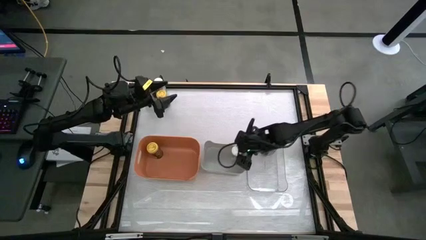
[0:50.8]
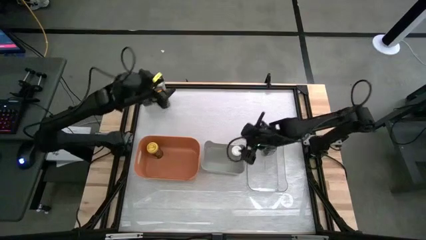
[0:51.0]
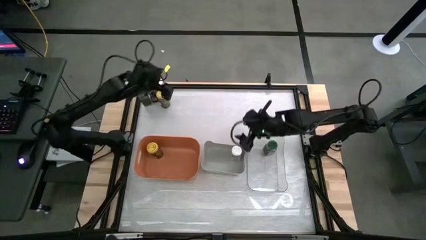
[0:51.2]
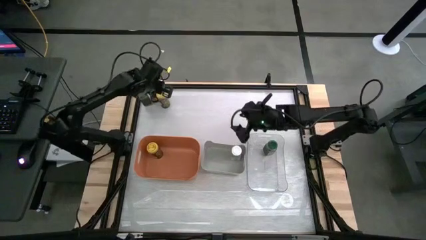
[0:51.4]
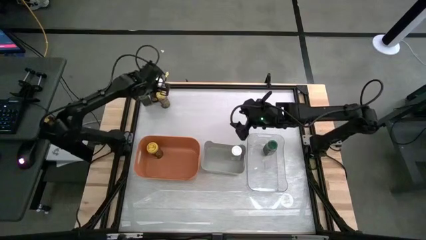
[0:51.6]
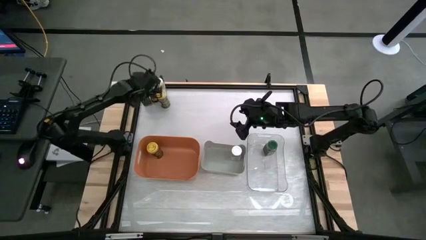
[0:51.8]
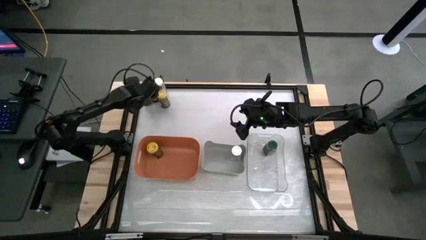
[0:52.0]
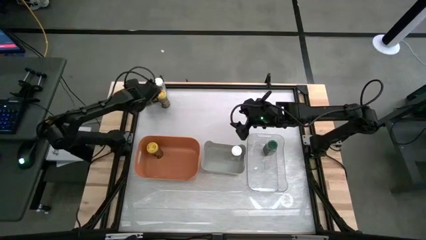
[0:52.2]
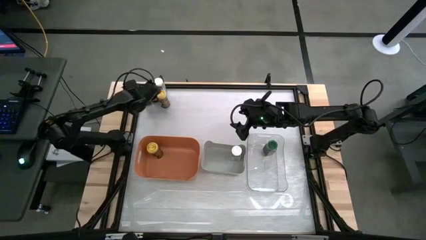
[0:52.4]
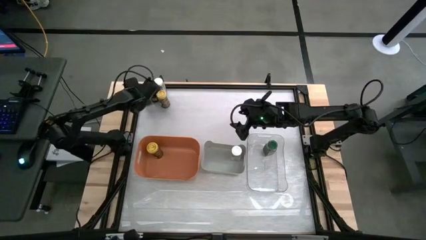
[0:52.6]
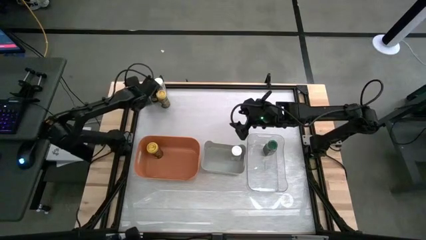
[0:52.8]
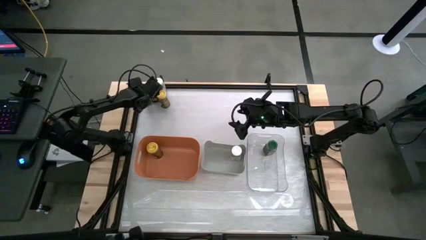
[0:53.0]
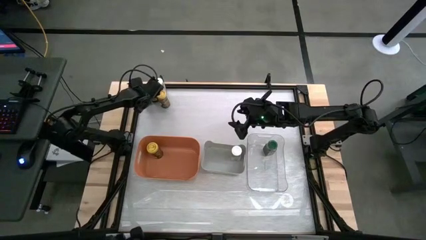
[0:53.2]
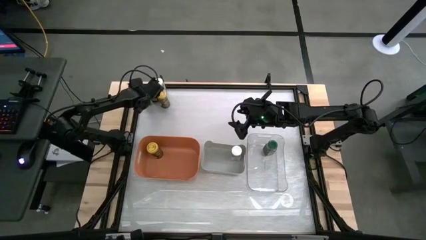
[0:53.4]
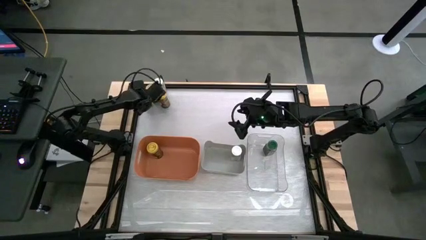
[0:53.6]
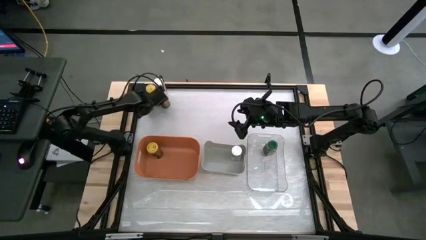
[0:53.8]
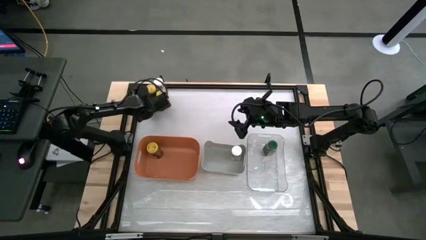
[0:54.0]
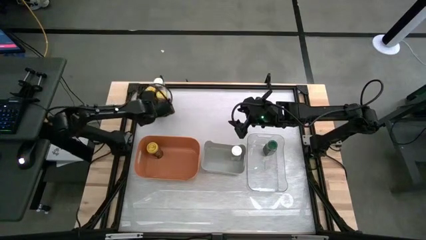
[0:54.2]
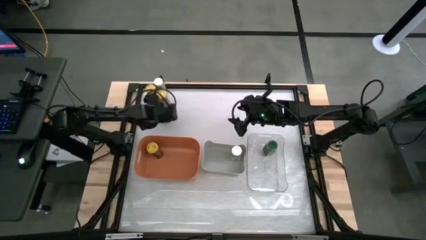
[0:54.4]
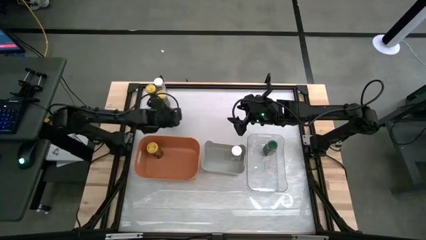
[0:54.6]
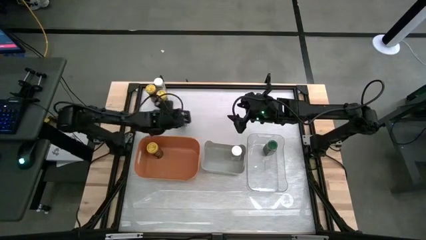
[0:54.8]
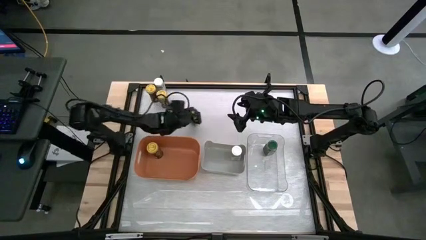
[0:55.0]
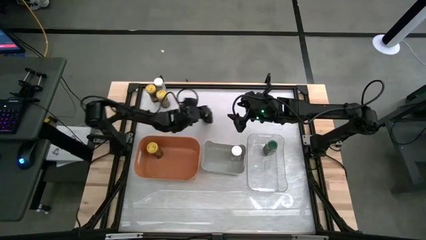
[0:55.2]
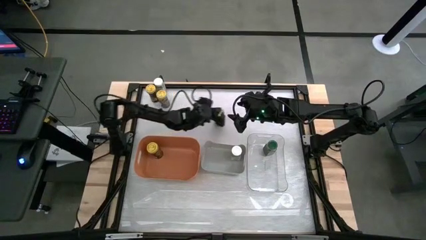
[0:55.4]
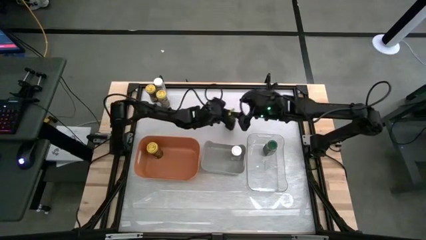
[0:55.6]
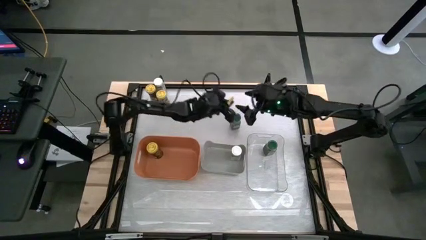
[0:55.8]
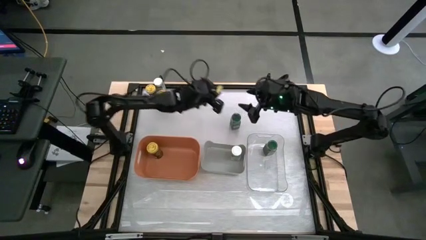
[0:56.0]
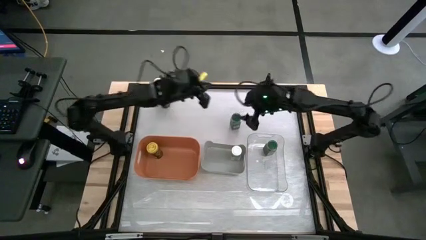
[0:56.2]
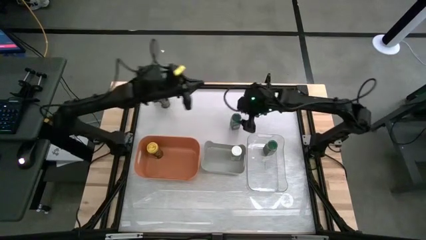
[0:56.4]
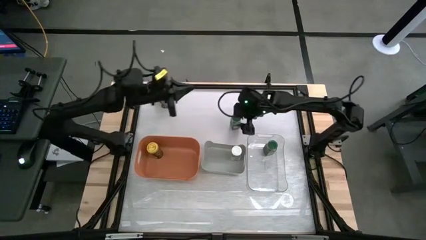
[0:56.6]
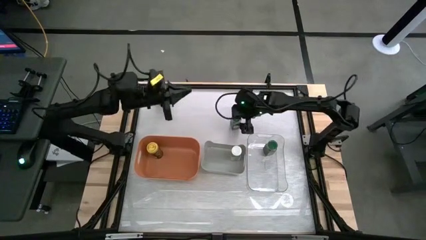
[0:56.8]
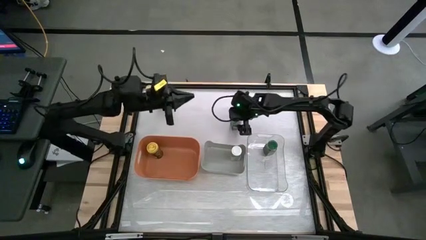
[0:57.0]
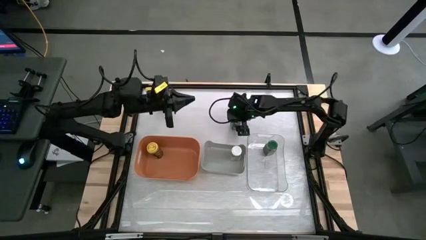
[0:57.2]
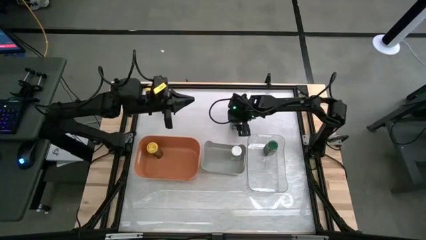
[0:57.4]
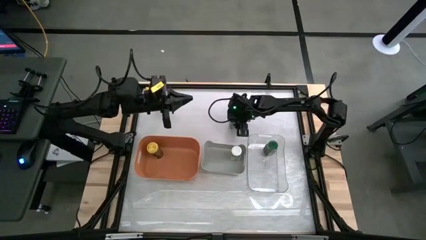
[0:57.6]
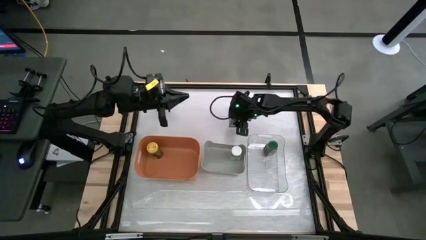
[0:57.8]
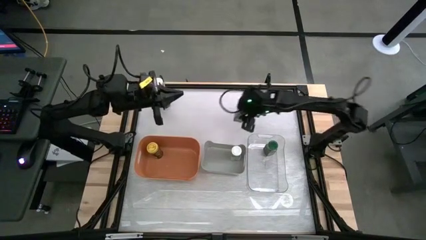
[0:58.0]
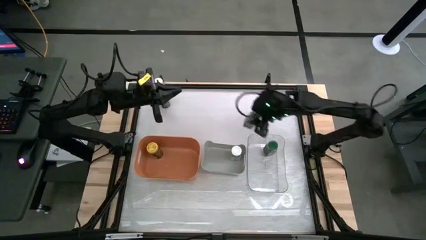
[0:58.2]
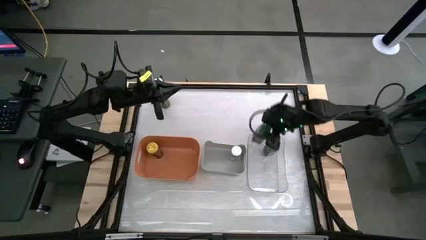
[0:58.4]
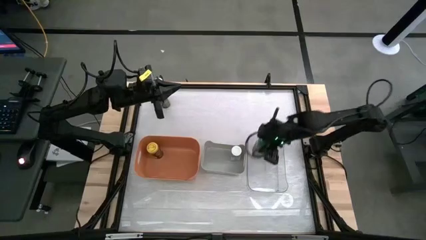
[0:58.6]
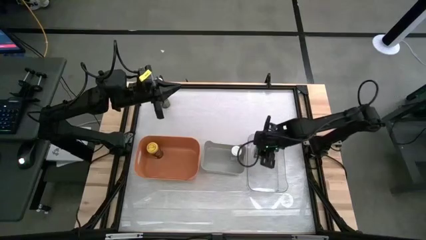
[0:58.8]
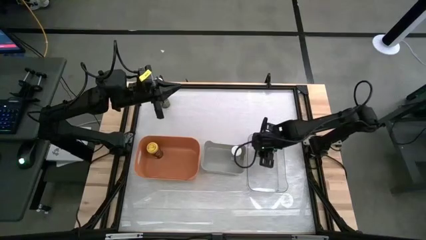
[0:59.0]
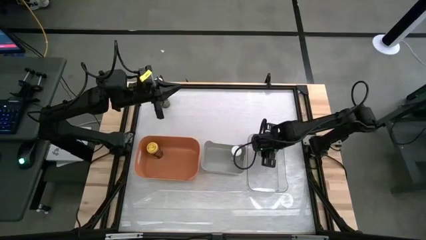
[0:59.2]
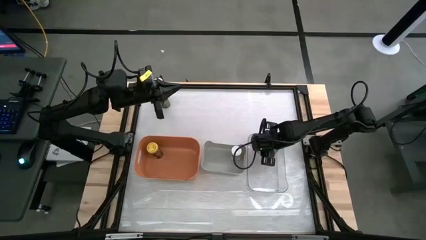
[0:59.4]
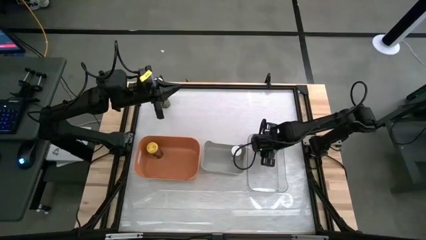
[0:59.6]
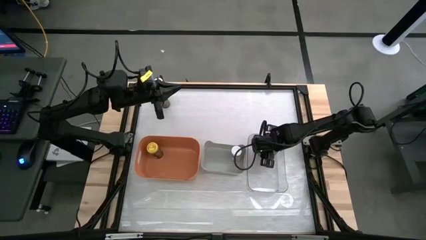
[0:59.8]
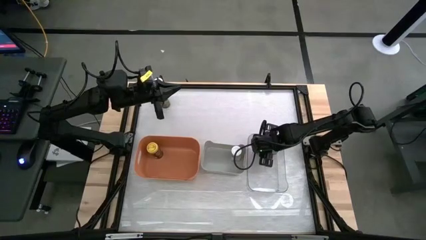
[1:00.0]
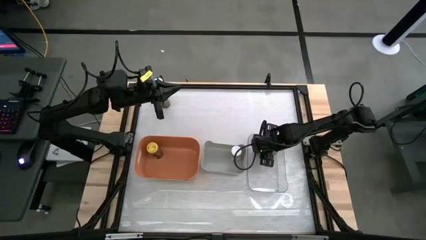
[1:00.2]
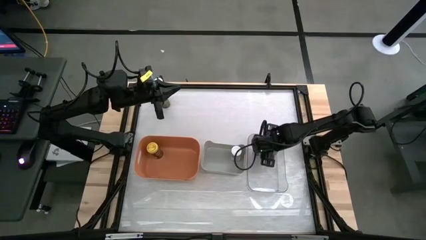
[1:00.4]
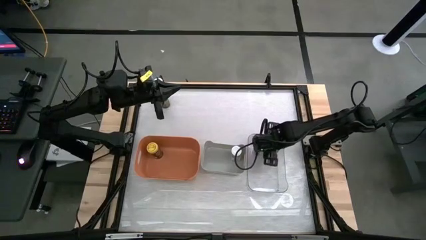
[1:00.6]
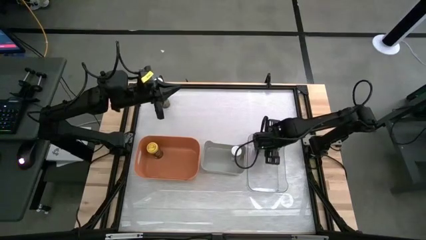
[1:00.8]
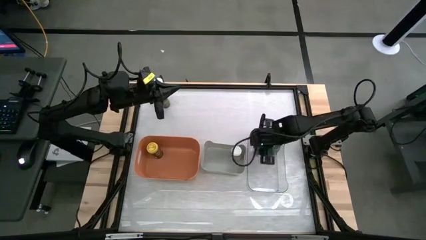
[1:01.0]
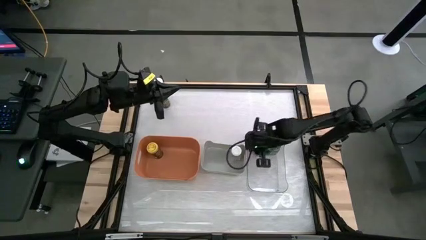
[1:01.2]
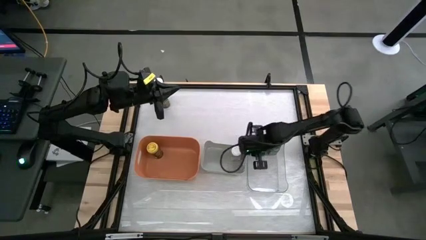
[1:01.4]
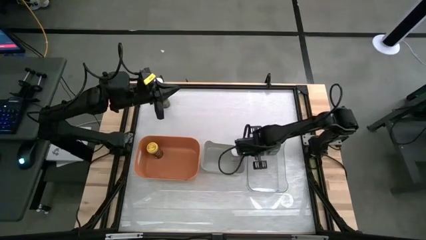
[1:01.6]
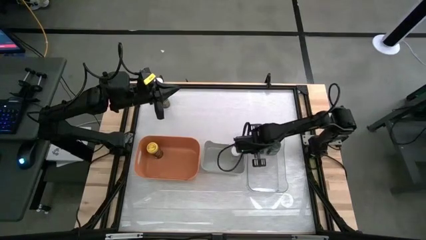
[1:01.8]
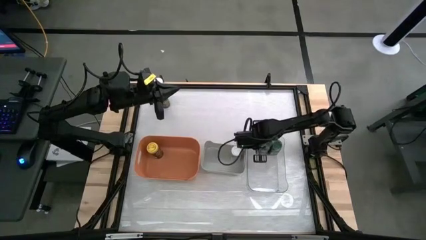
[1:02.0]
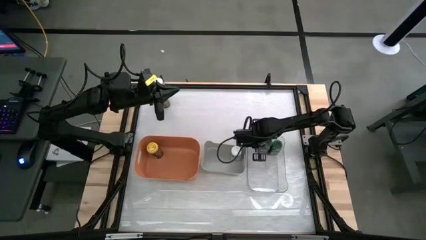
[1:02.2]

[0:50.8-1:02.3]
Task: Sort spices by type
Put the green seasoning bottle into the transparent bin

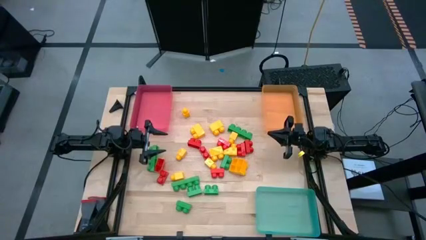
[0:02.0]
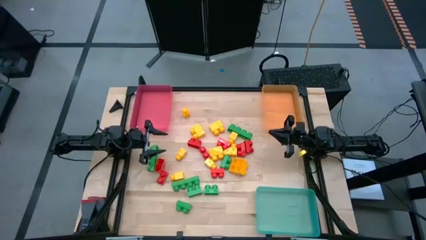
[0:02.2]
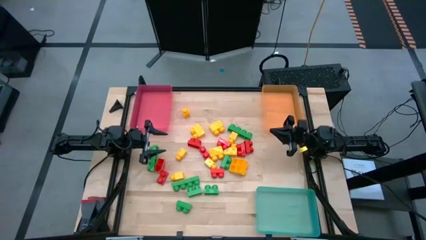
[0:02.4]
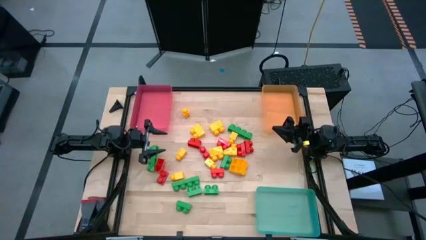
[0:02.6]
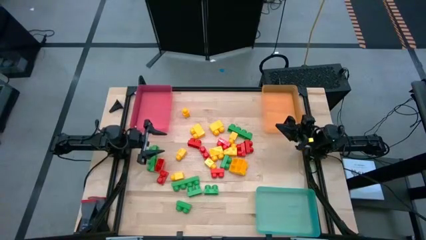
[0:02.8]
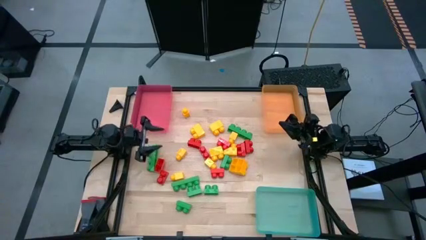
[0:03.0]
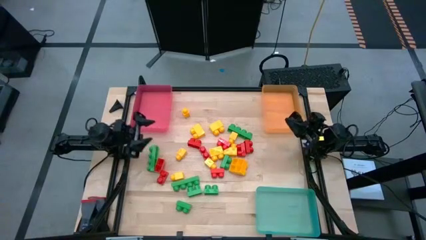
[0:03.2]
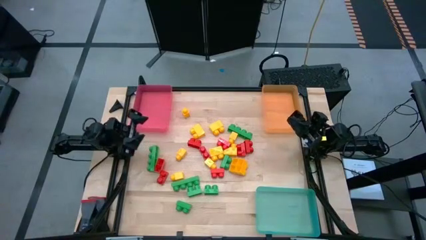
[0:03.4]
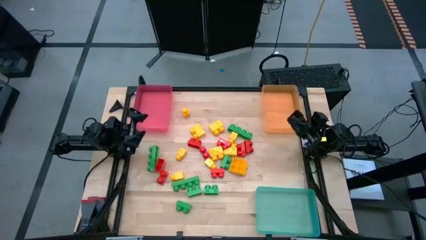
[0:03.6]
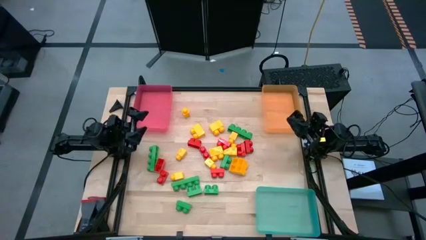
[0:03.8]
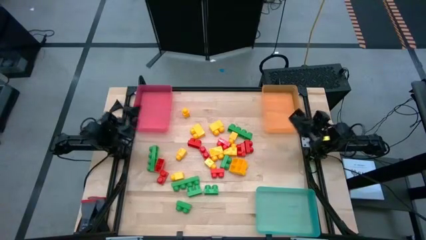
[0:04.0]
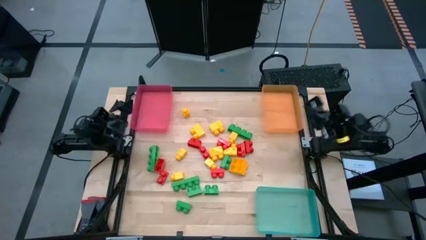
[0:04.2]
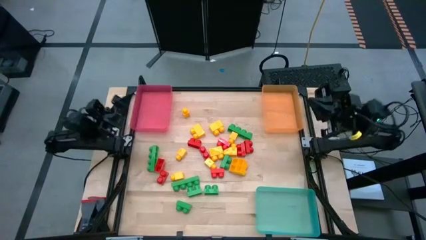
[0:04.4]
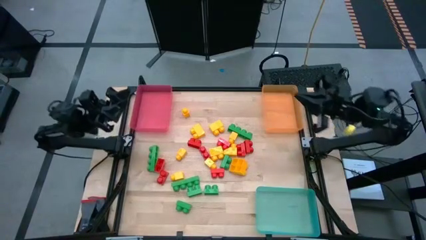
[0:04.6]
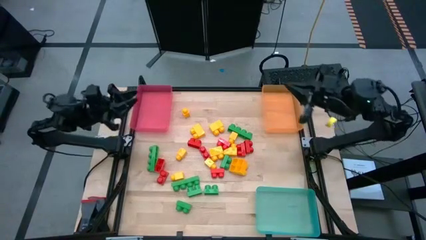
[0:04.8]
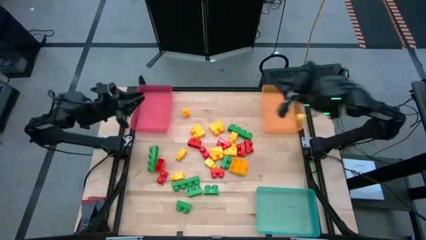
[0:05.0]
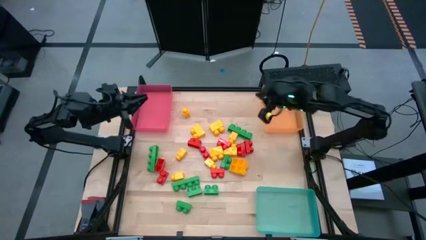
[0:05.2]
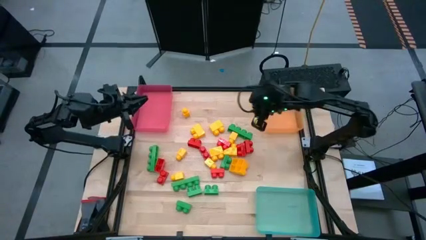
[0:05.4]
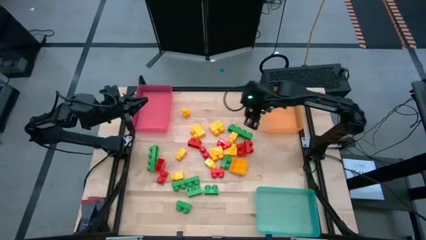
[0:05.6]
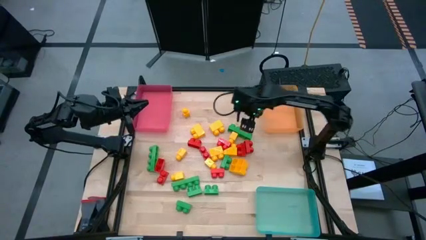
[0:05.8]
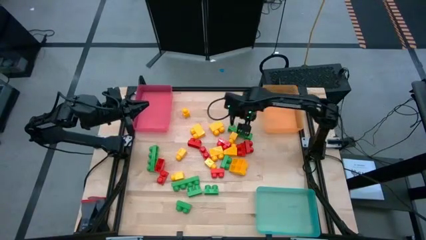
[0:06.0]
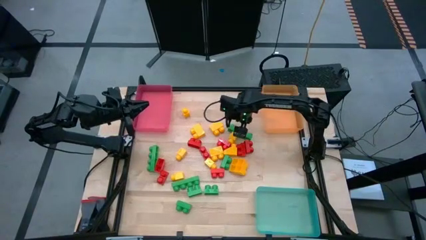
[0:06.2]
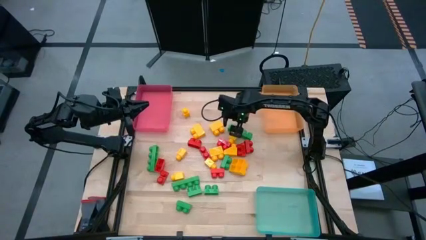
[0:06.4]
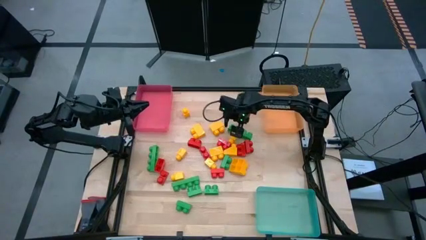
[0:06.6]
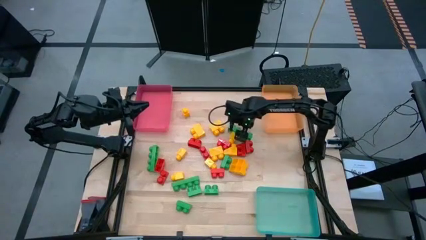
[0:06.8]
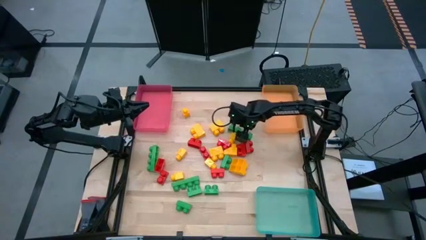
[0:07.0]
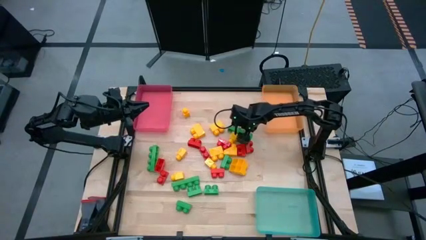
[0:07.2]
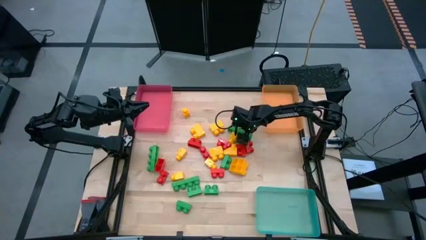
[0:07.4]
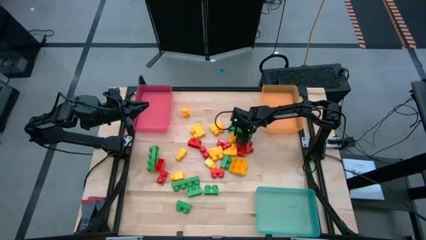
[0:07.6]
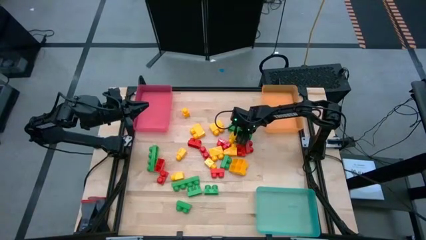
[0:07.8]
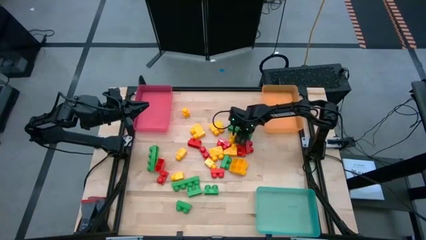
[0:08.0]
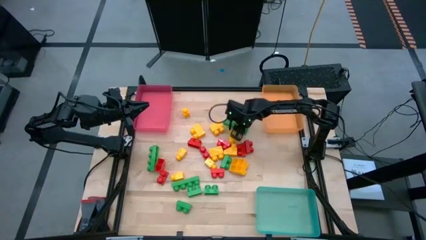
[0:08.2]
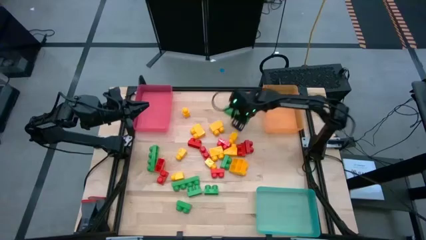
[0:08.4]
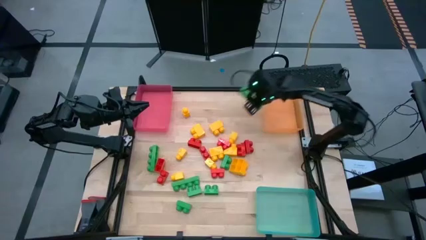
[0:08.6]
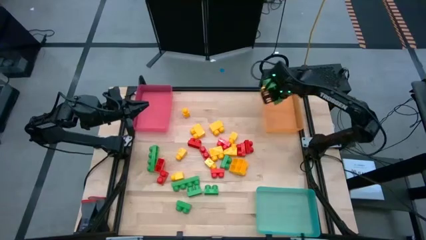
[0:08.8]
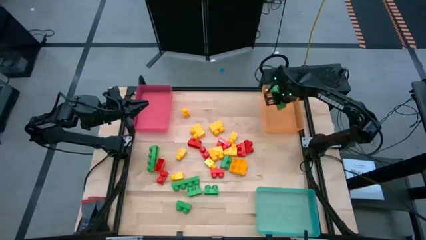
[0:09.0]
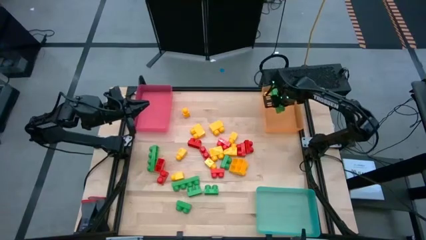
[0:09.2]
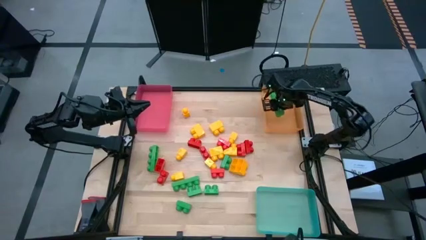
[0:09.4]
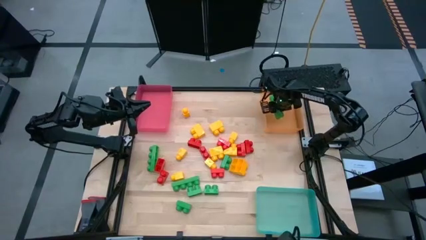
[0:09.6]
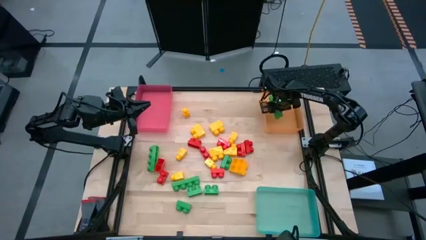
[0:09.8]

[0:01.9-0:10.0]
Task: Sort blocks
Put the green game piece into the orange bin
